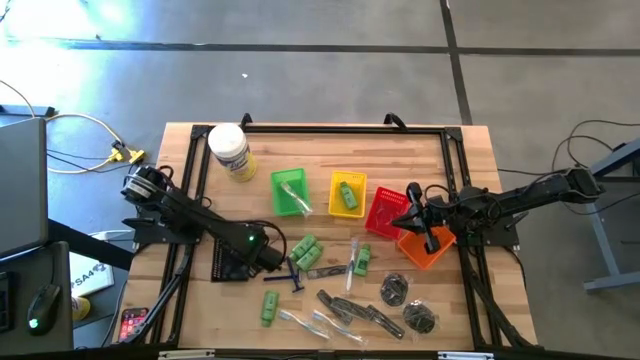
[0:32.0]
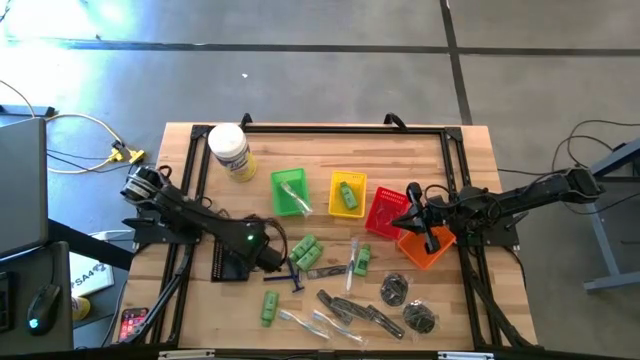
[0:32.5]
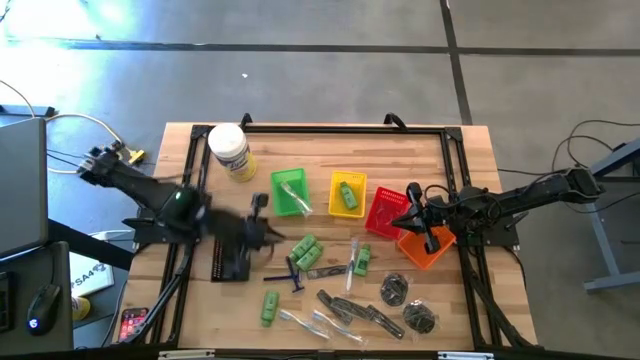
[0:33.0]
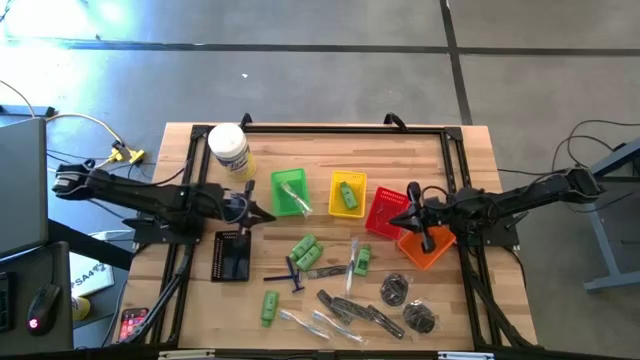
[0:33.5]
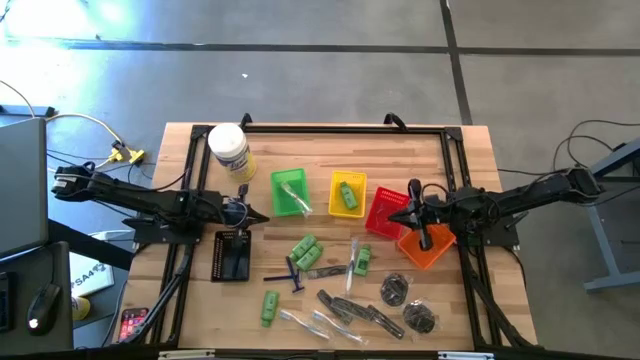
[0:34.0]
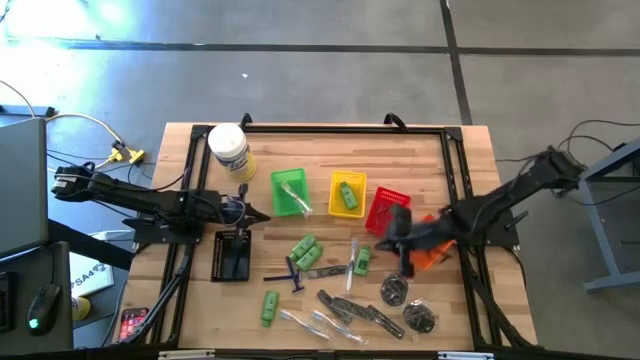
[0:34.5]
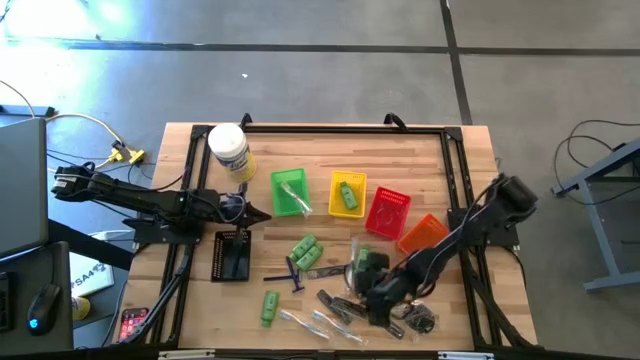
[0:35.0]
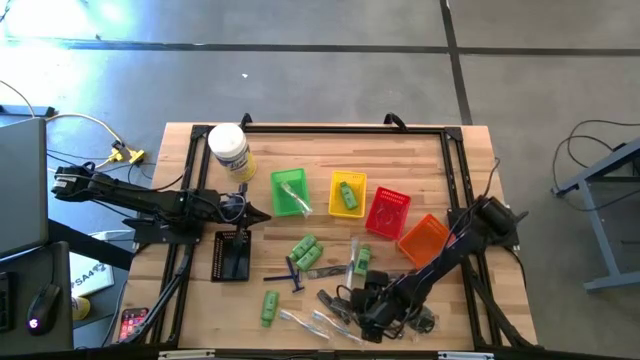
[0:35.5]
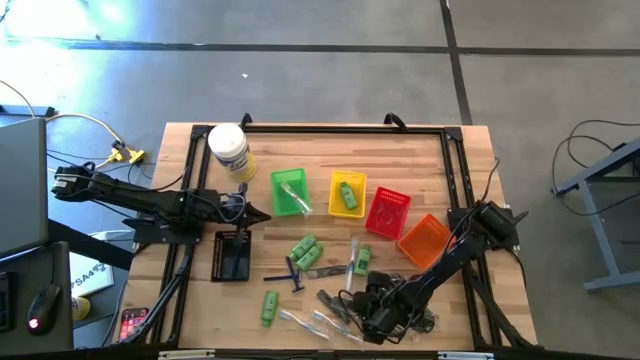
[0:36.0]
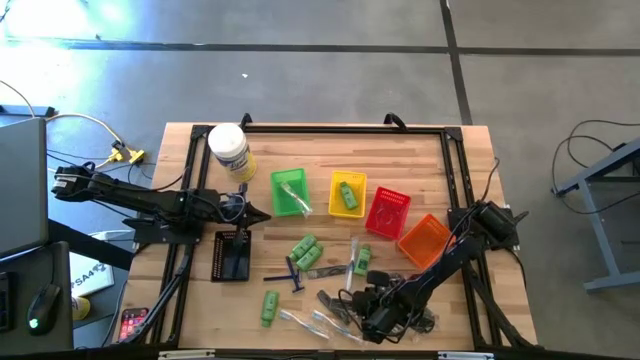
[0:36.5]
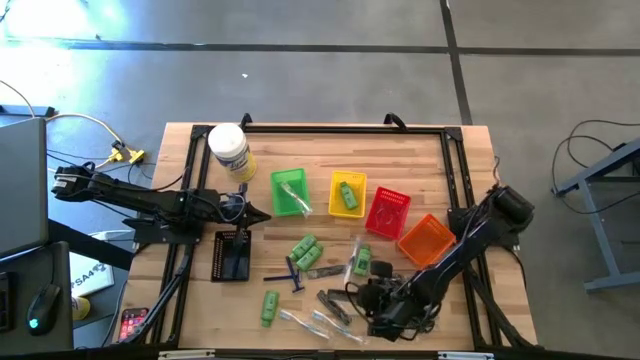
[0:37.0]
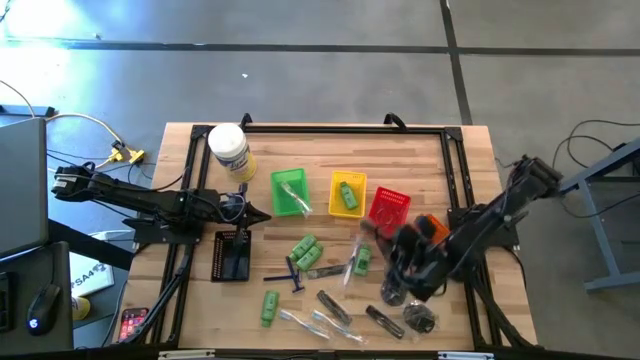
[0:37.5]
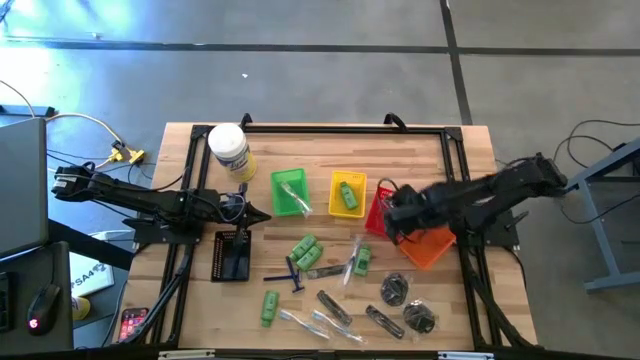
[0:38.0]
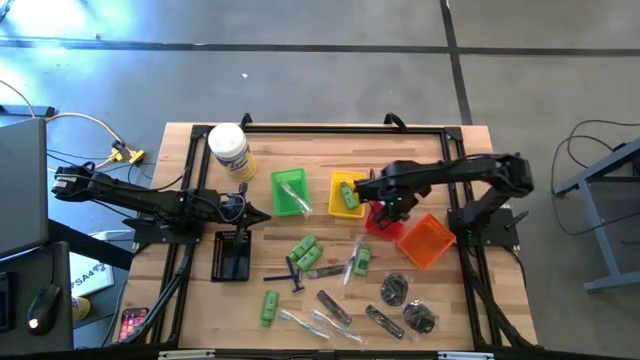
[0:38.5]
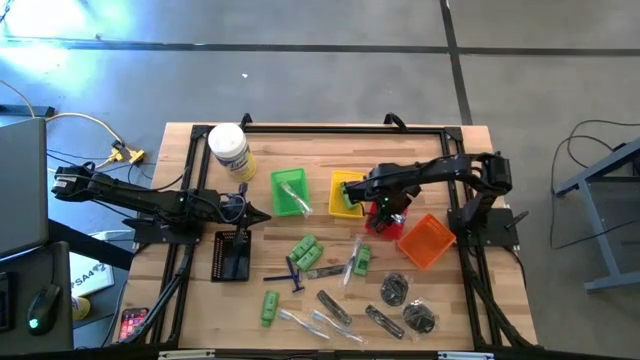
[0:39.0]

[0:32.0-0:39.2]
Task: Pick & Place Travel size toiletries
Put the black hair comb into the red bin

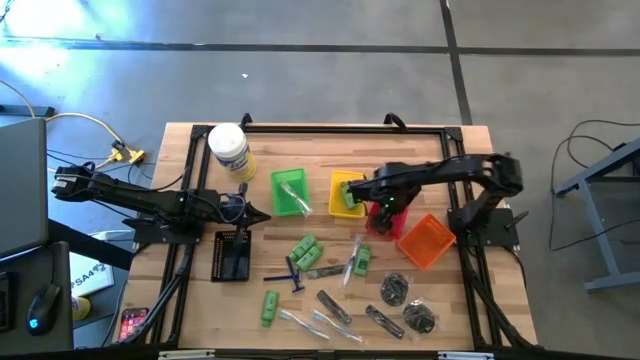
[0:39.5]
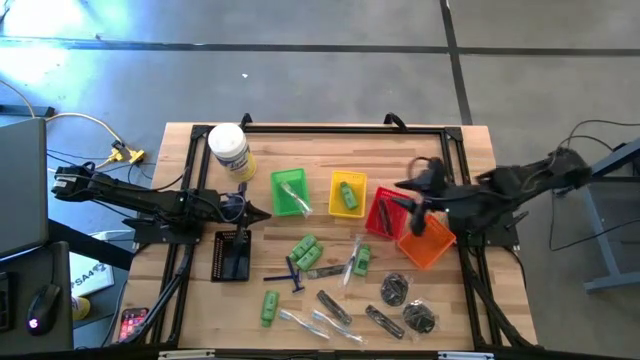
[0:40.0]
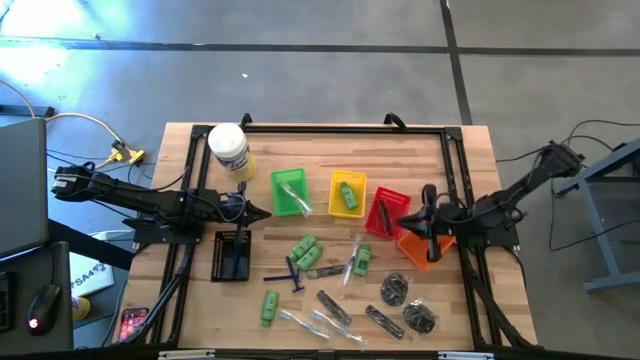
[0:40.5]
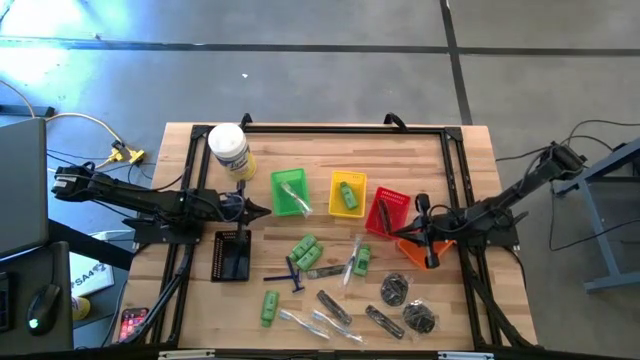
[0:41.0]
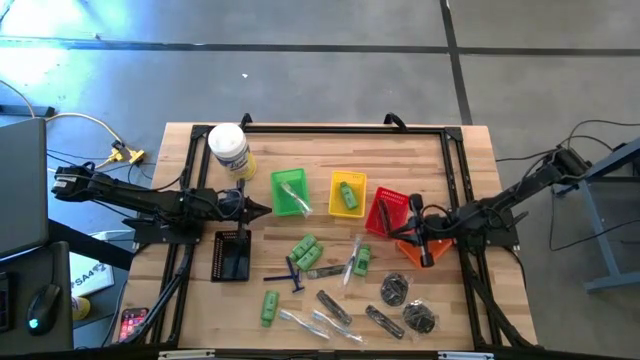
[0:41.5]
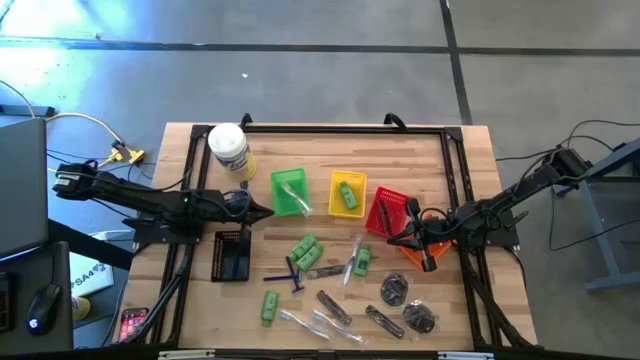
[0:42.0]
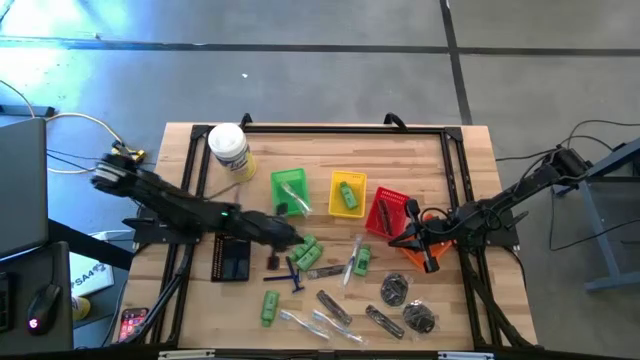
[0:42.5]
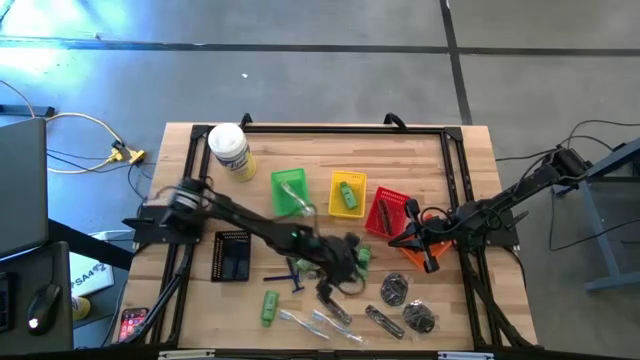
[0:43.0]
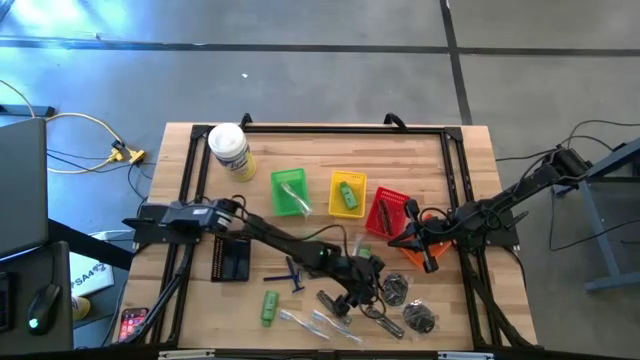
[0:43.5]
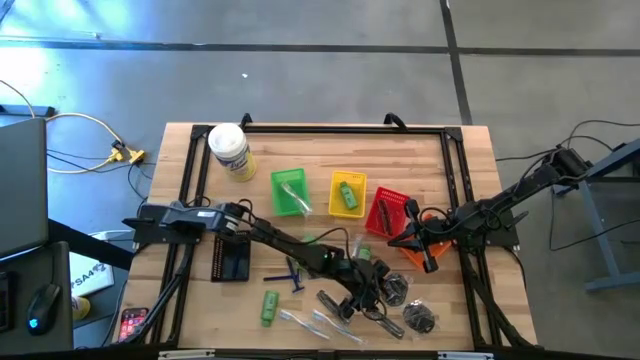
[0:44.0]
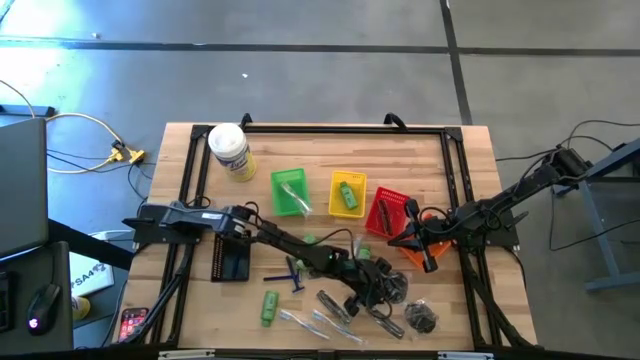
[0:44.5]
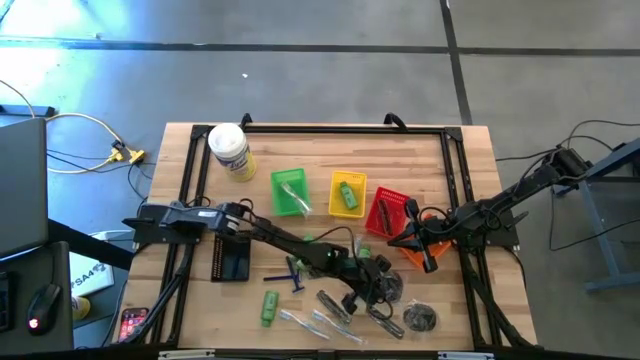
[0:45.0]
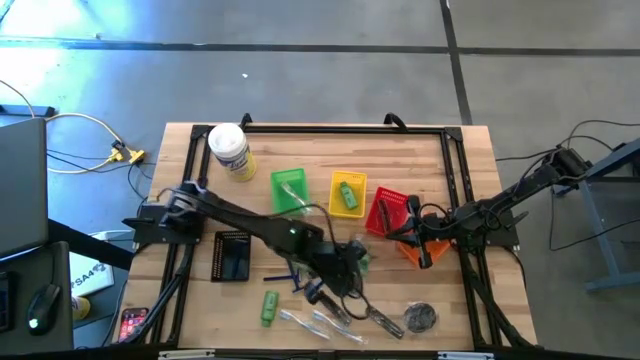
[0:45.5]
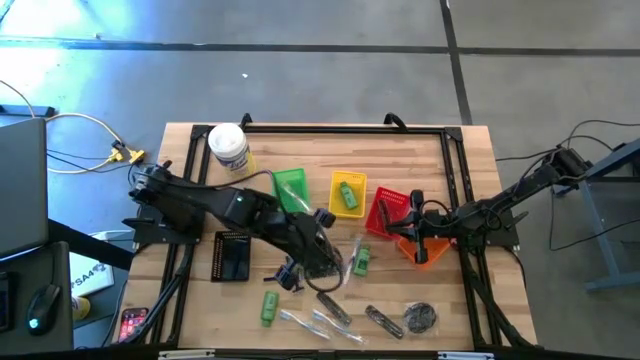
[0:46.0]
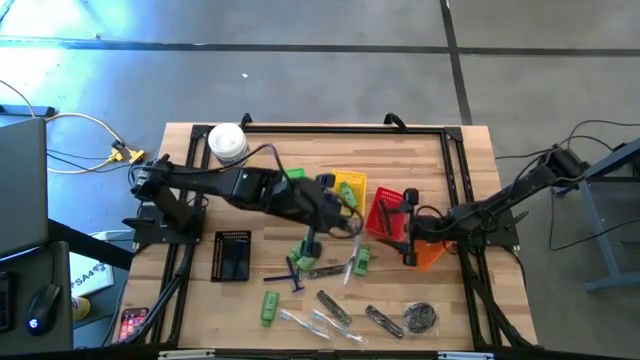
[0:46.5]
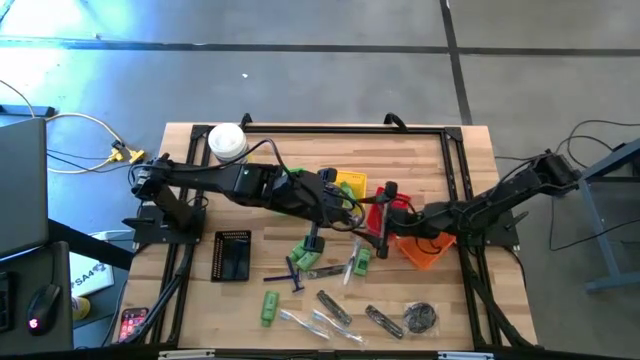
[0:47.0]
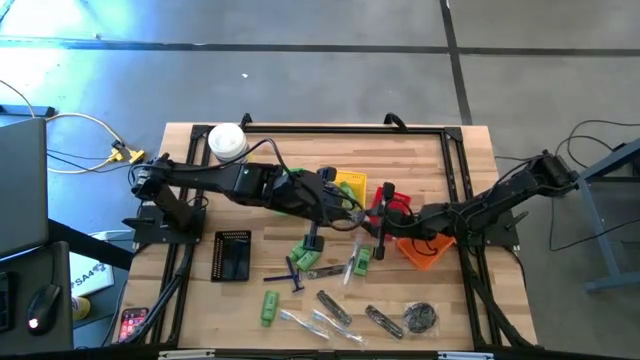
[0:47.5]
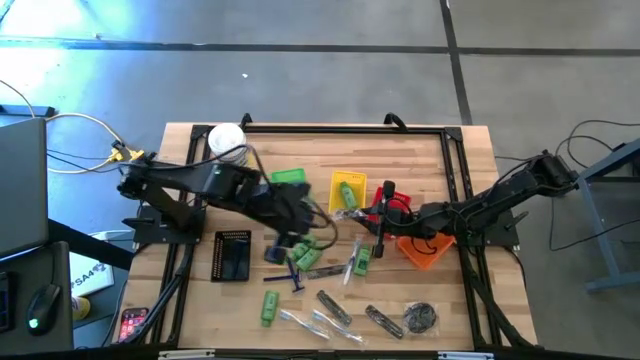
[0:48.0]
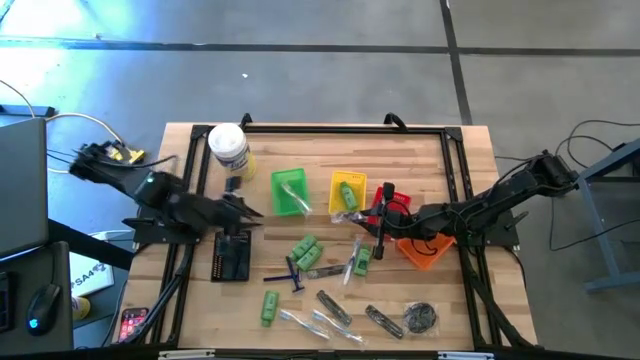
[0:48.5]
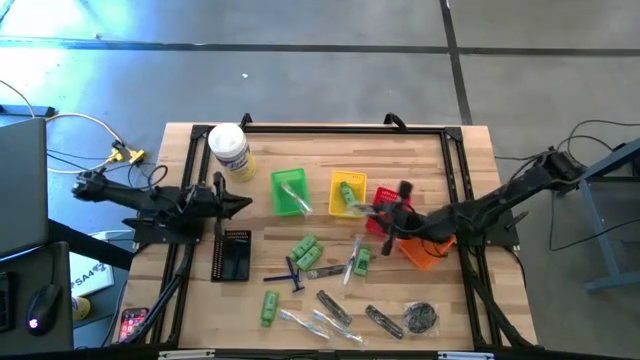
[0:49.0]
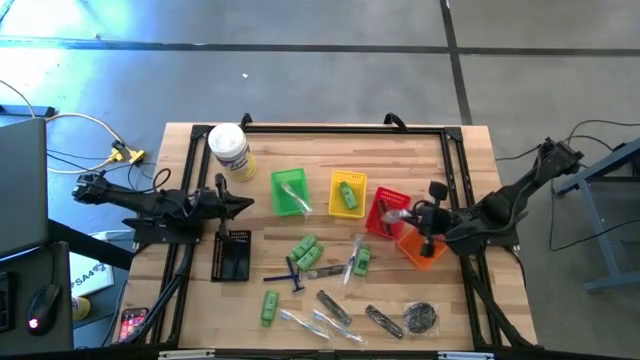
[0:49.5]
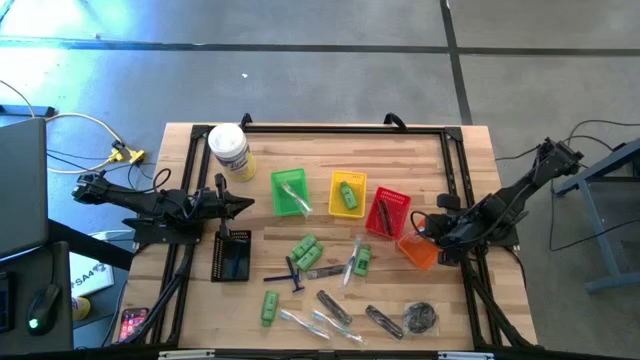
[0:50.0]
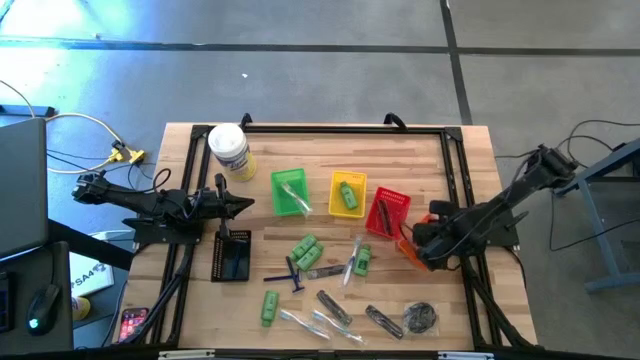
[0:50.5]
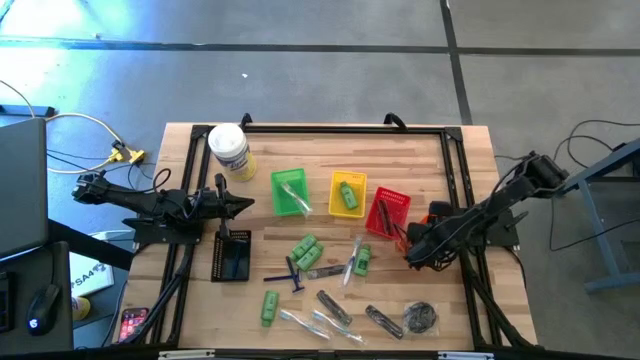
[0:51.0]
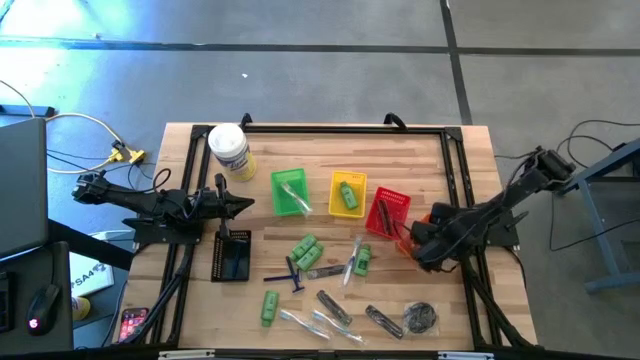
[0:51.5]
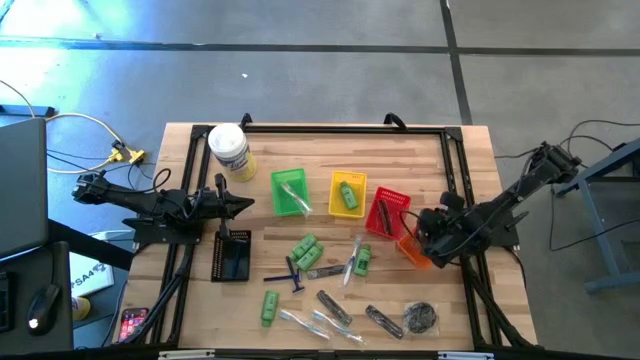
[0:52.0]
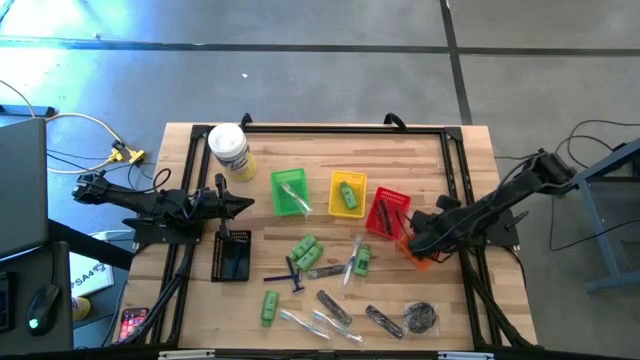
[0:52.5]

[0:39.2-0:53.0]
Put the black hairbrush into the orange bin
